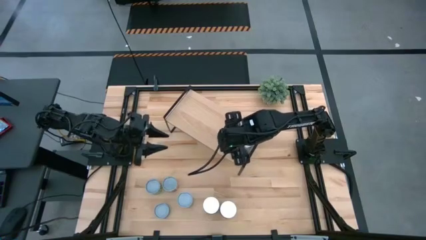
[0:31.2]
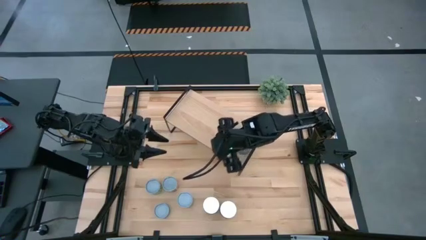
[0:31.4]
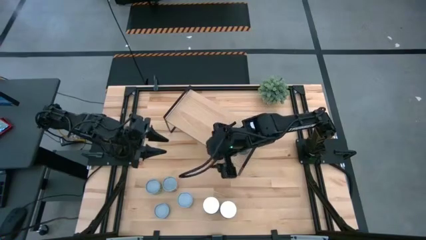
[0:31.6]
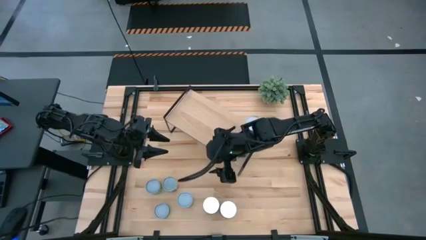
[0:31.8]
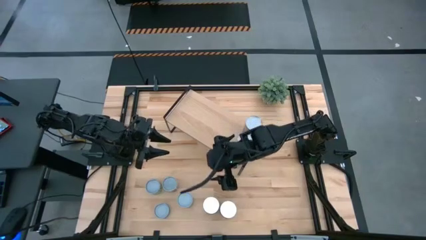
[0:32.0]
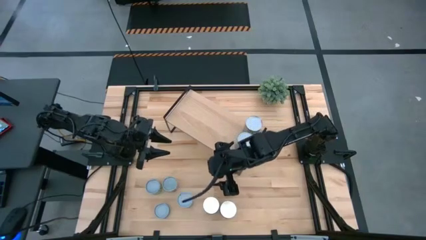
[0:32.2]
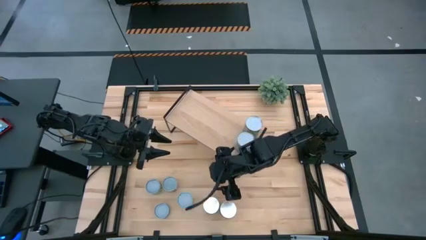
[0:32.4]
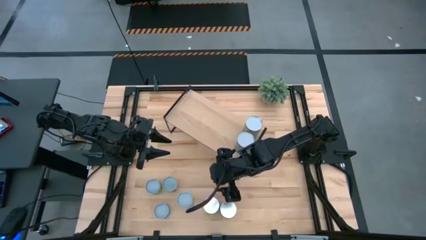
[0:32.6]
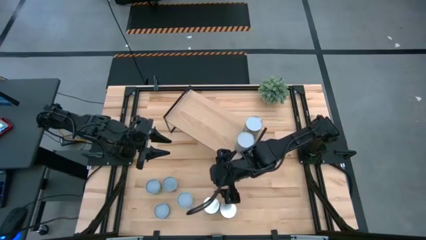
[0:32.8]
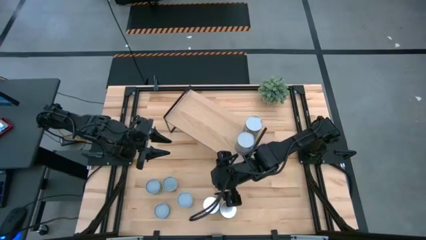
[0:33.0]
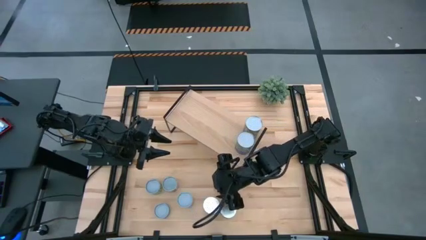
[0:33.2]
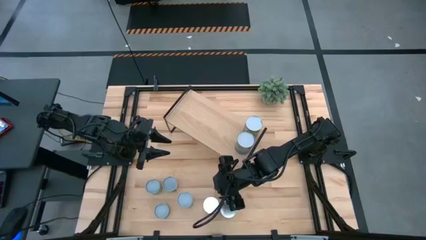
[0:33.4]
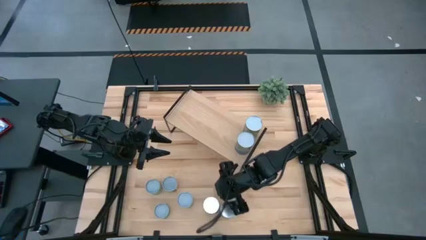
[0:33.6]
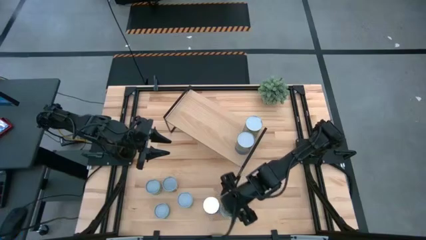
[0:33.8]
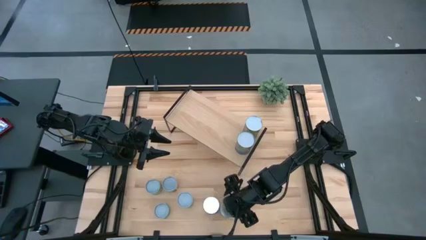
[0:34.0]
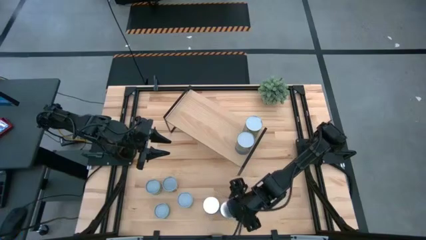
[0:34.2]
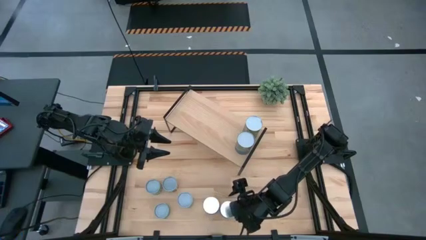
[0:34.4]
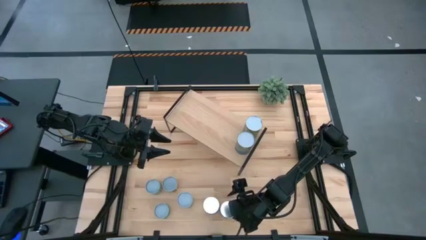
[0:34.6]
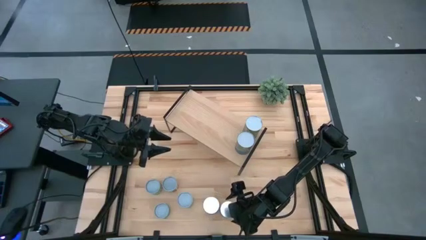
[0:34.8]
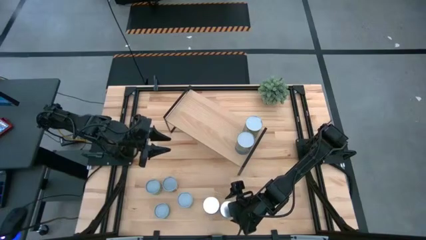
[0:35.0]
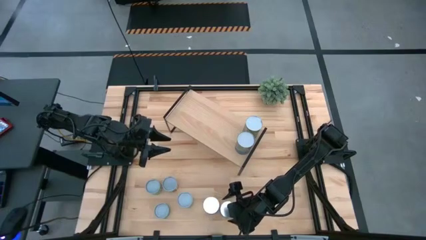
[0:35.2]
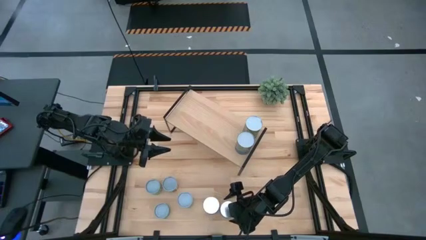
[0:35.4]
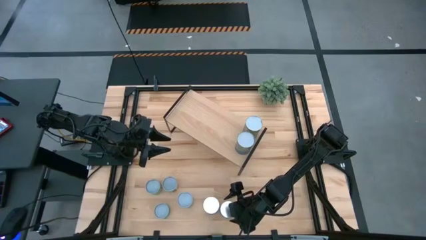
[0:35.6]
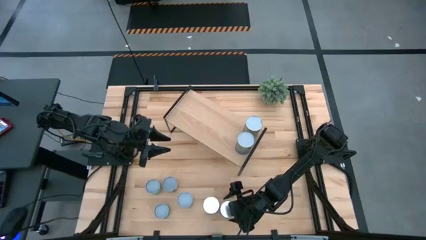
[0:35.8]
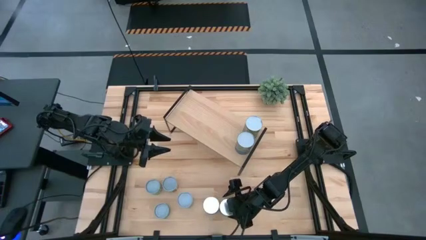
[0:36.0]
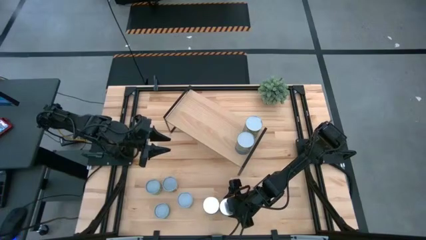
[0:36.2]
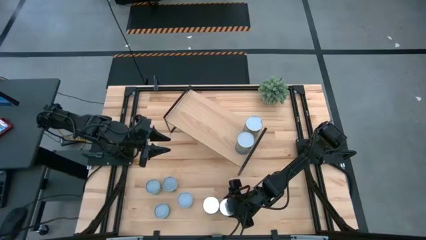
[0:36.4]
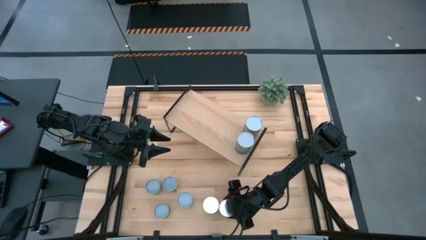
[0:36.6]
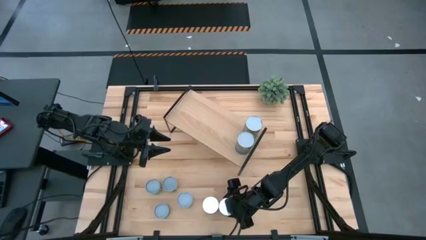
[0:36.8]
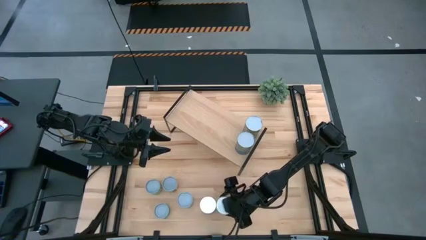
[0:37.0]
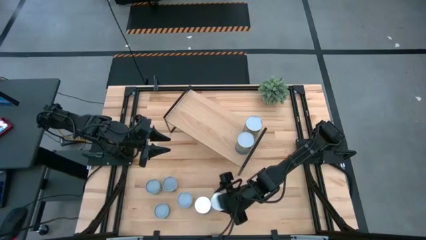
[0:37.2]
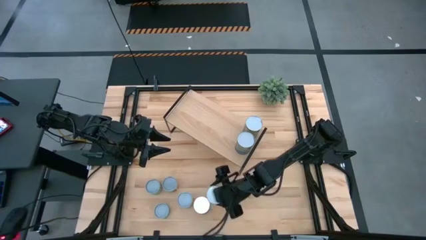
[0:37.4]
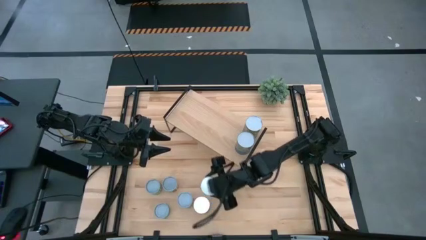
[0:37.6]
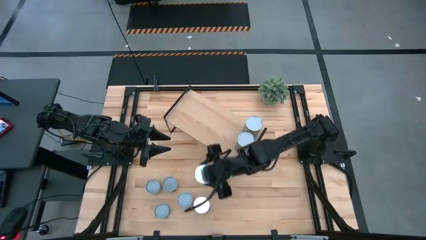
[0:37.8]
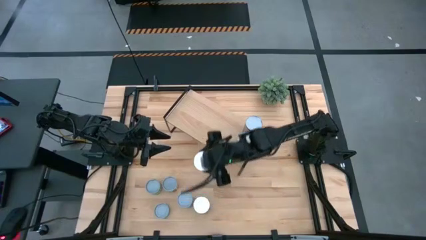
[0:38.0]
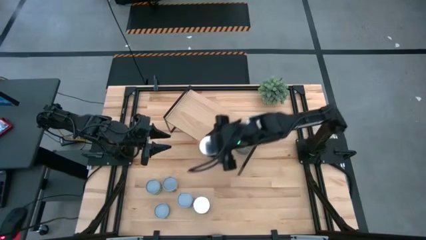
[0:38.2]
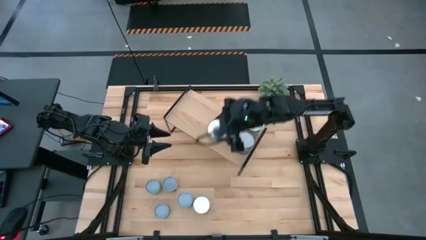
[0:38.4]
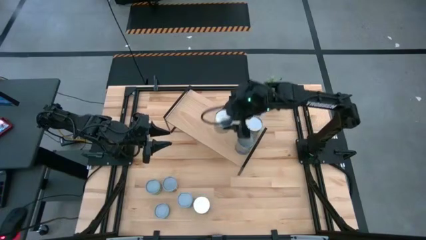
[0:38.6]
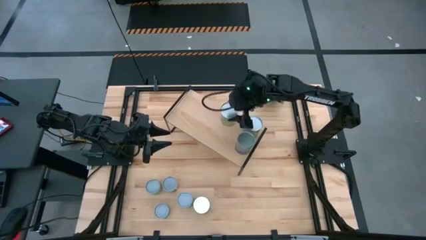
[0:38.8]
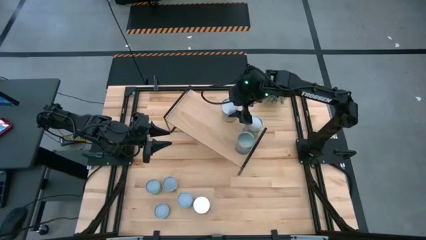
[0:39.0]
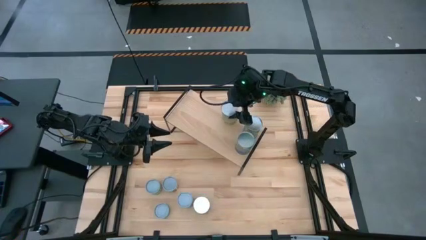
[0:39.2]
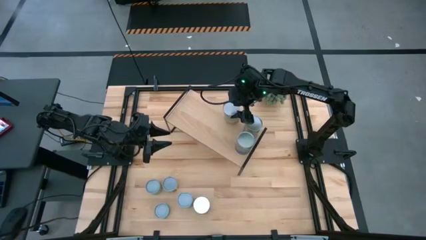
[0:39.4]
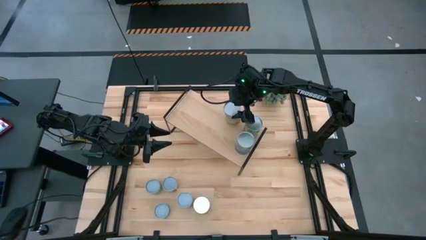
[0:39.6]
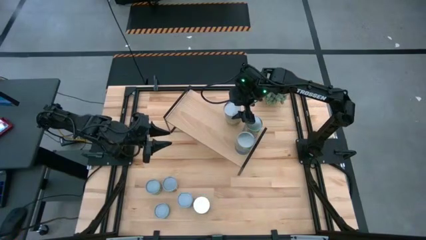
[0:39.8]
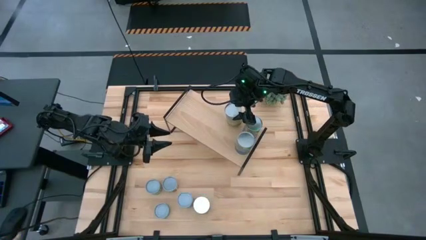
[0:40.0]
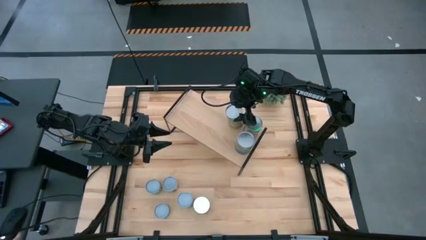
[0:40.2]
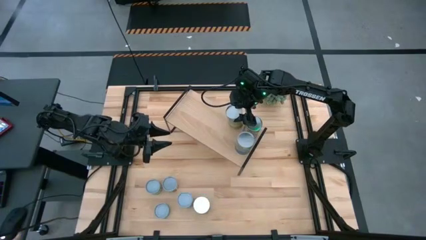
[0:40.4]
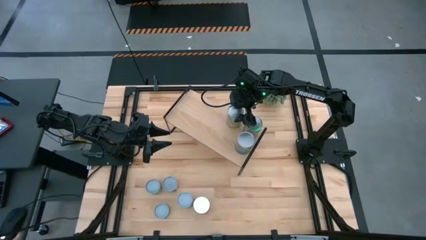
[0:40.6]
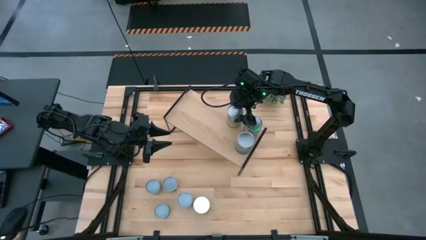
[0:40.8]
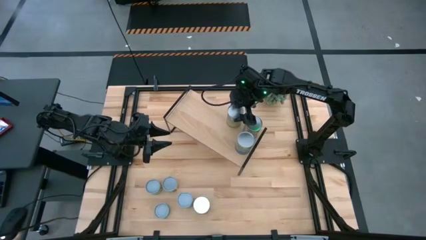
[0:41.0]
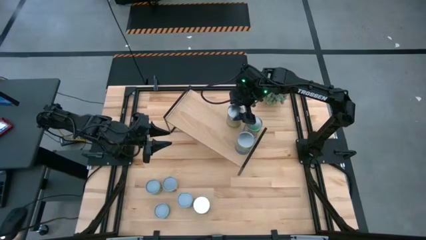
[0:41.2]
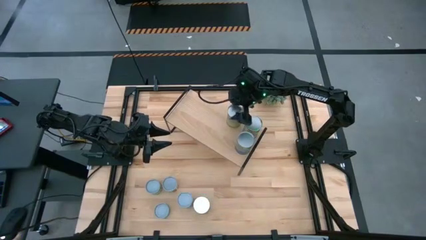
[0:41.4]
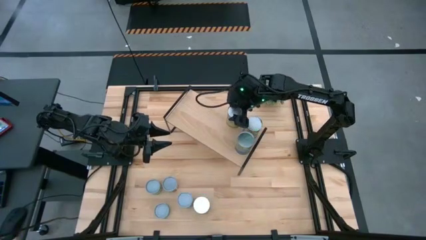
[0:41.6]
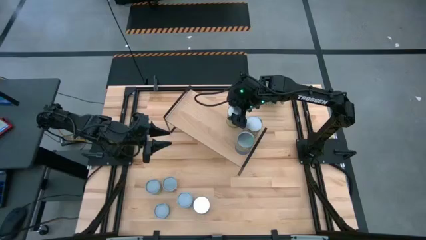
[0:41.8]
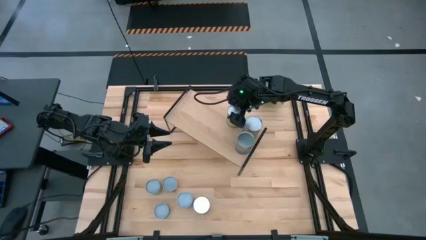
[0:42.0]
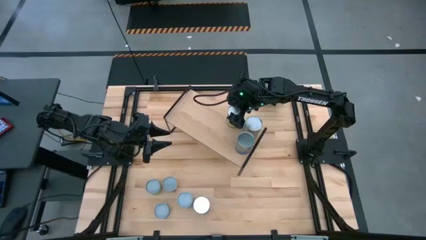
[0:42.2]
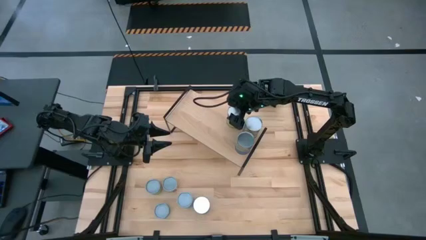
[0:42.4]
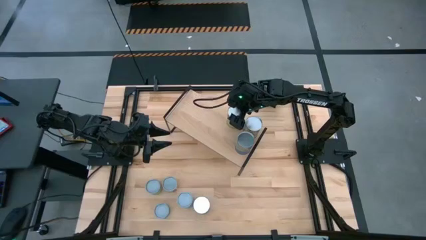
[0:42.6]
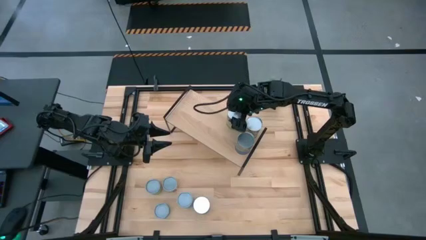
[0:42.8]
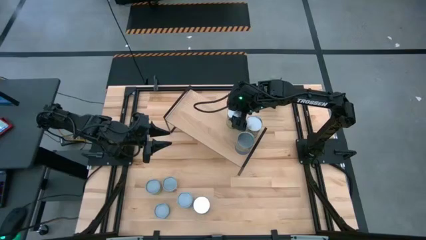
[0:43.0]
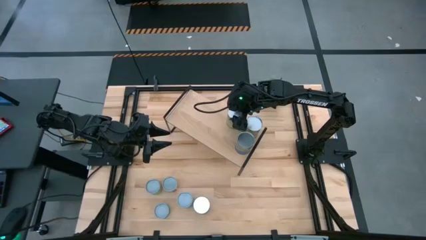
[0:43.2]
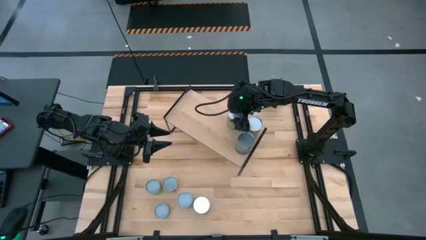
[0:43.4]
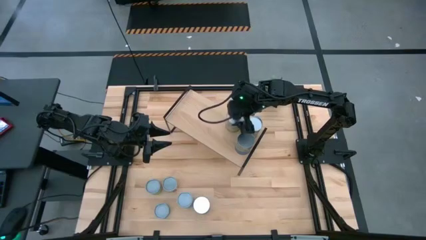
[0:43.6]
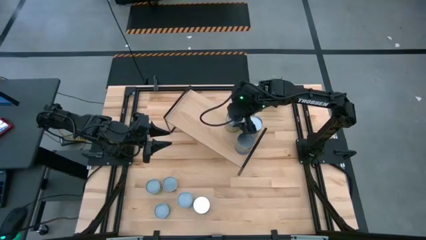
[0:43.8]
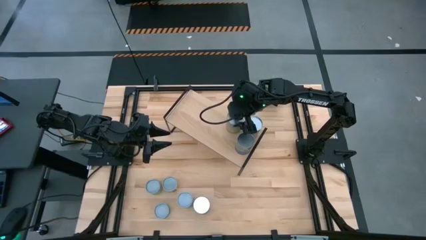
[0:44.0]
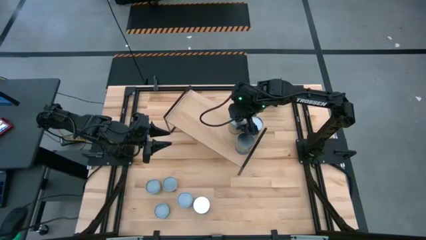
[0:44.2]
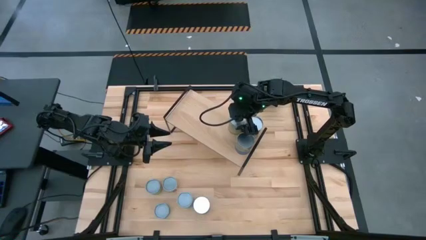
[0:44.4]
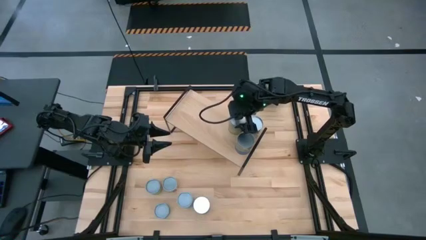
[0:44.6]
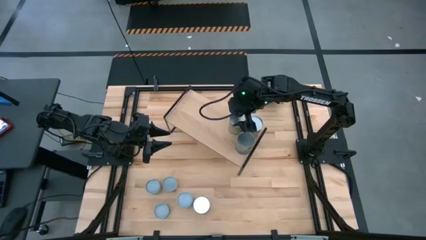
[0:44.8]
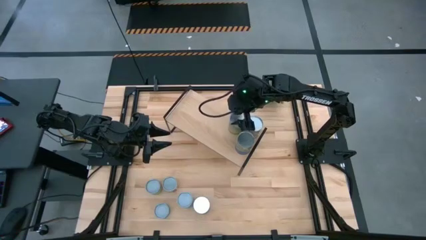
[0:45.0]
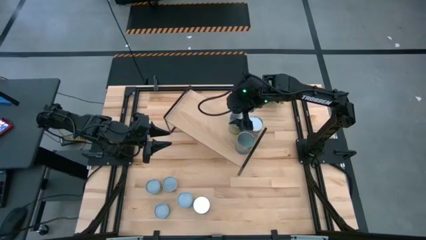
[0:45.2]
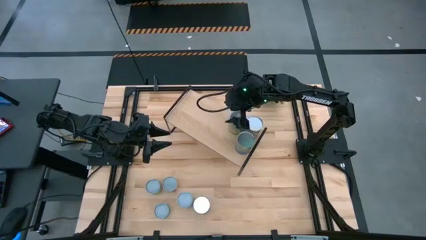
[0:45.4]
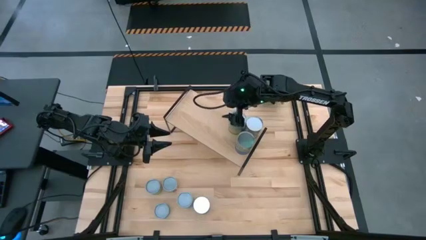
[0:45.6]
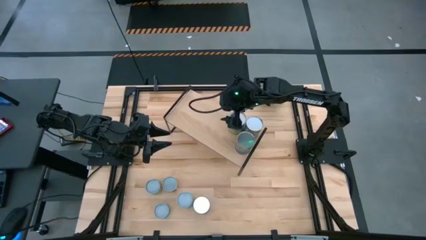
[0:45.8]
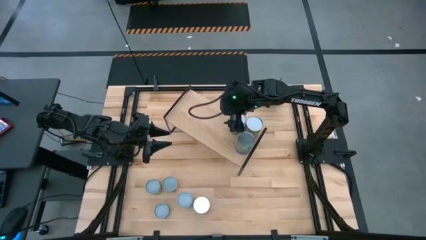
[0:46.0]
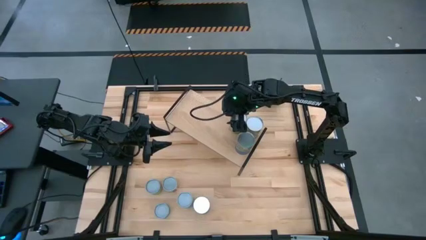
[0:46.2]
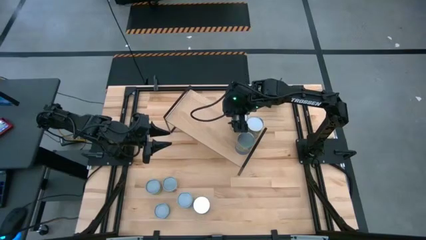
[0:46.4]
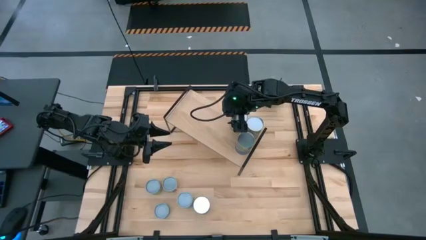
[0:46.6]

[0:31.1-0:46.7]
Task: Pick and place cans onto a shelf
Put the canned carrot on the shelf
